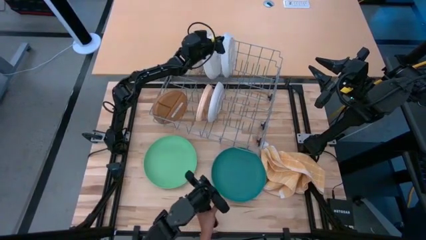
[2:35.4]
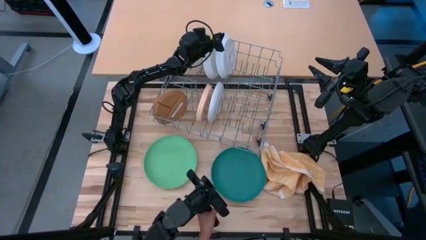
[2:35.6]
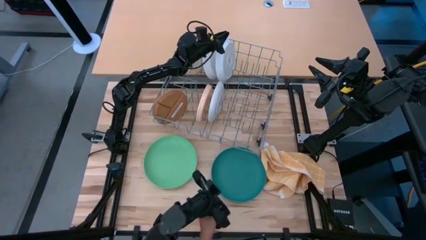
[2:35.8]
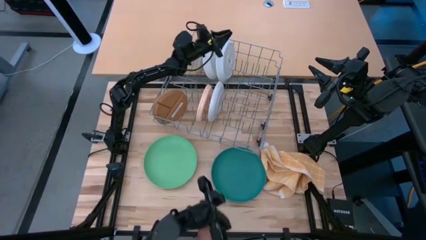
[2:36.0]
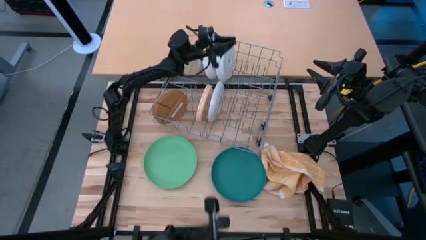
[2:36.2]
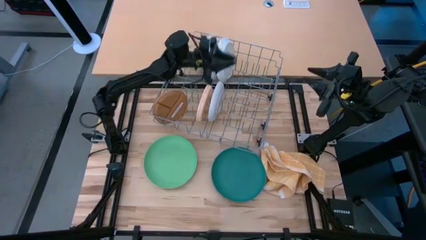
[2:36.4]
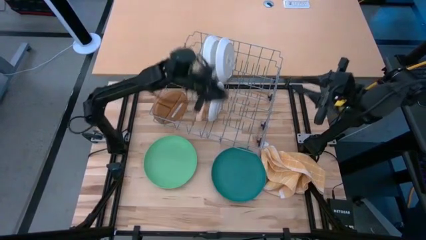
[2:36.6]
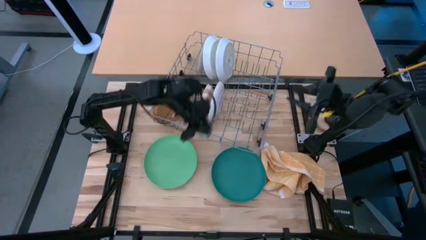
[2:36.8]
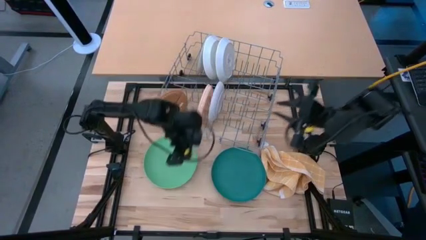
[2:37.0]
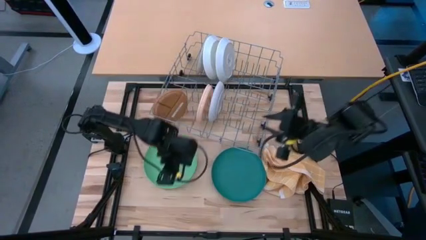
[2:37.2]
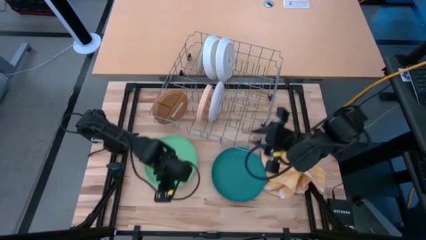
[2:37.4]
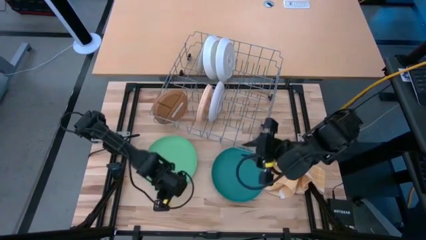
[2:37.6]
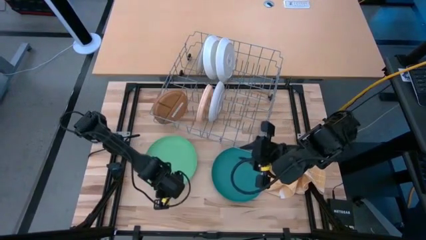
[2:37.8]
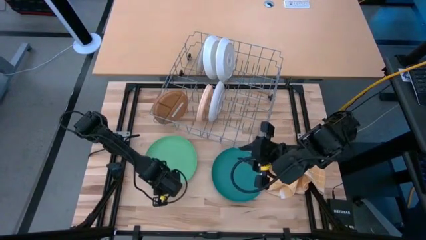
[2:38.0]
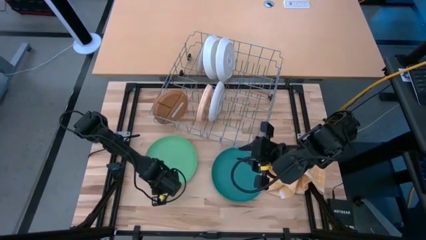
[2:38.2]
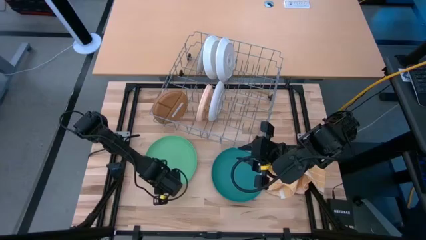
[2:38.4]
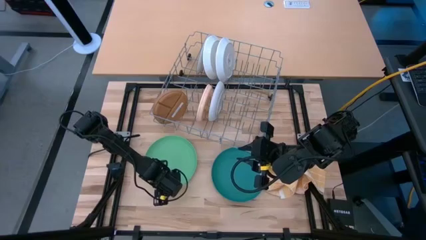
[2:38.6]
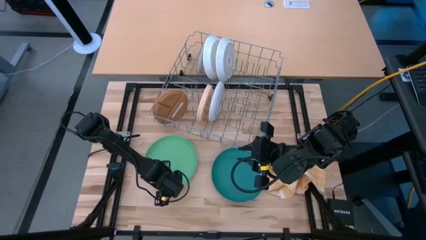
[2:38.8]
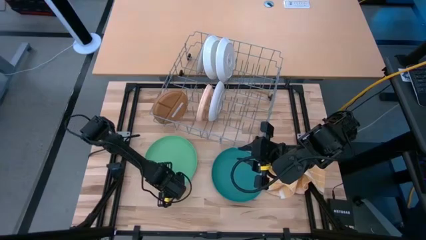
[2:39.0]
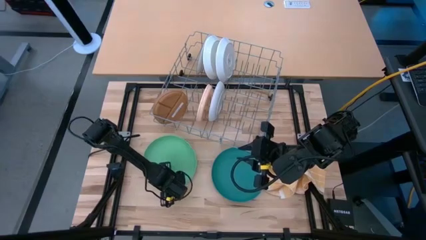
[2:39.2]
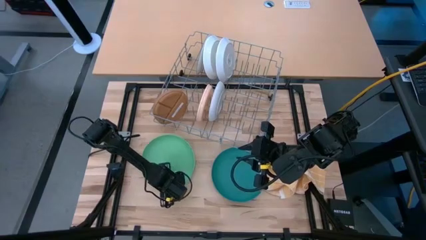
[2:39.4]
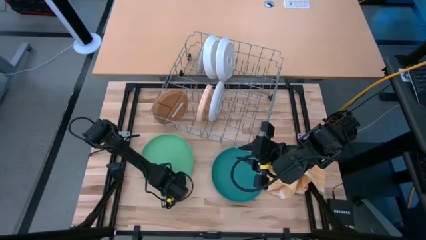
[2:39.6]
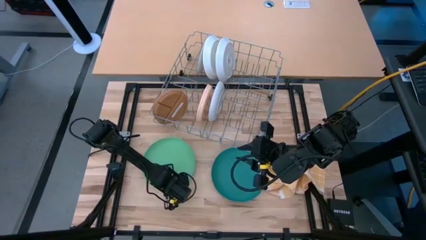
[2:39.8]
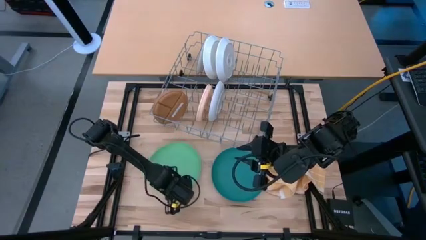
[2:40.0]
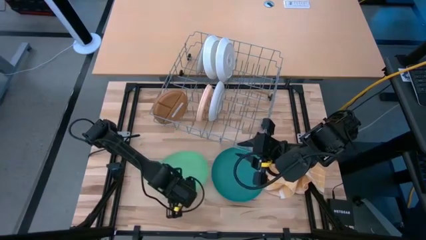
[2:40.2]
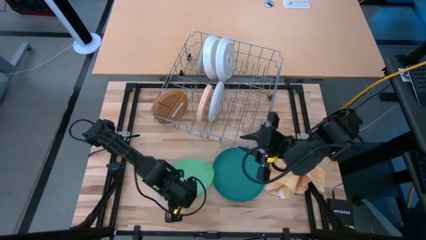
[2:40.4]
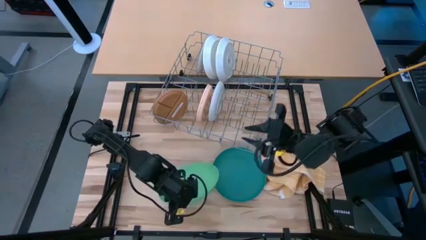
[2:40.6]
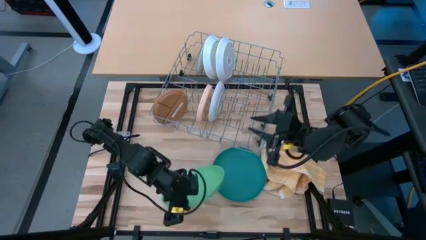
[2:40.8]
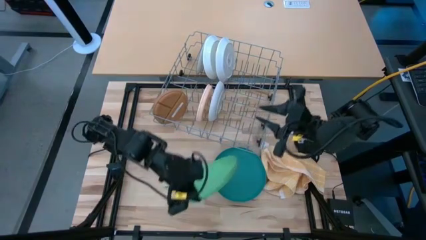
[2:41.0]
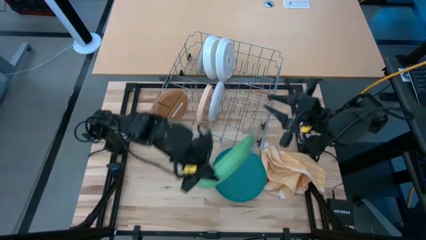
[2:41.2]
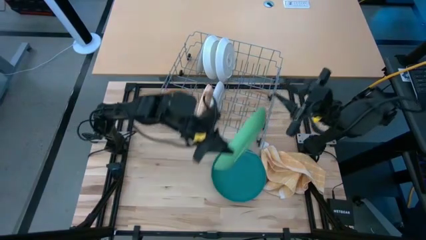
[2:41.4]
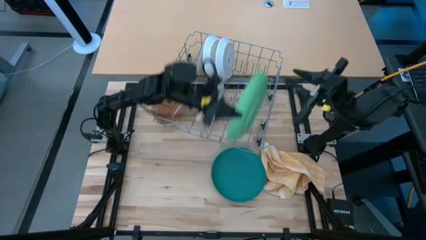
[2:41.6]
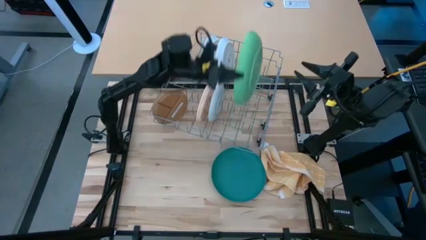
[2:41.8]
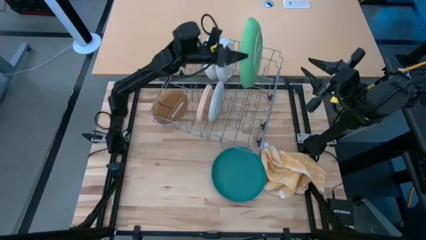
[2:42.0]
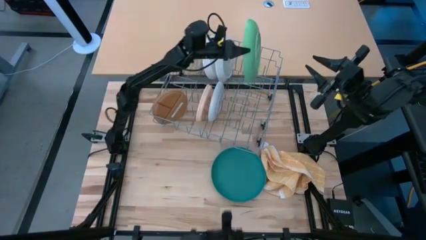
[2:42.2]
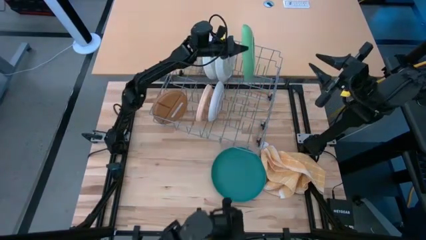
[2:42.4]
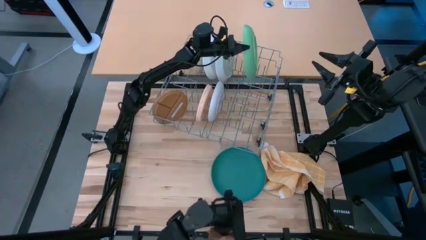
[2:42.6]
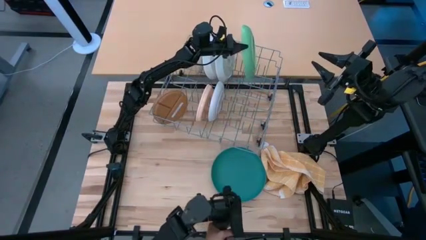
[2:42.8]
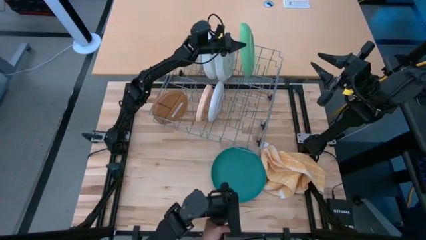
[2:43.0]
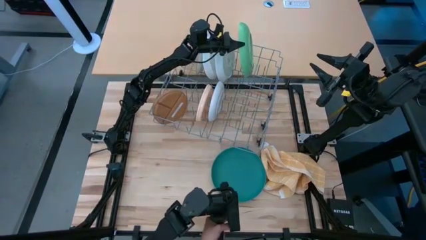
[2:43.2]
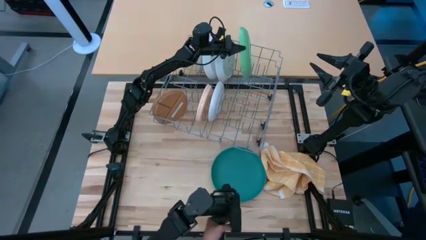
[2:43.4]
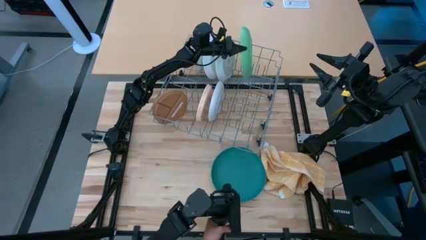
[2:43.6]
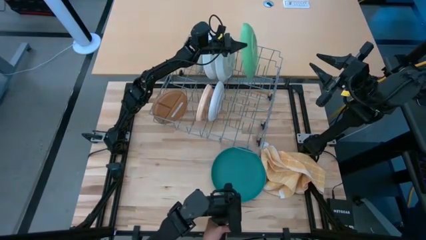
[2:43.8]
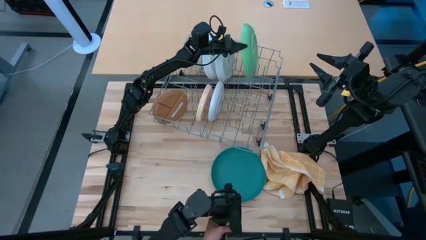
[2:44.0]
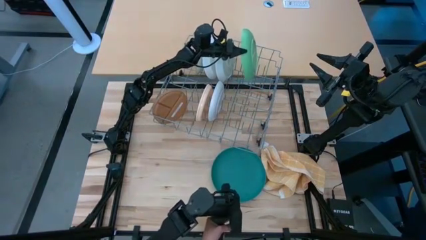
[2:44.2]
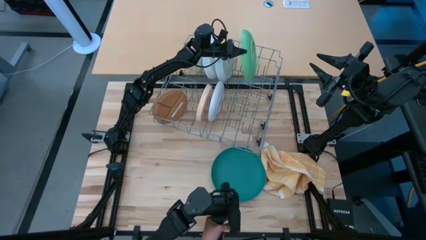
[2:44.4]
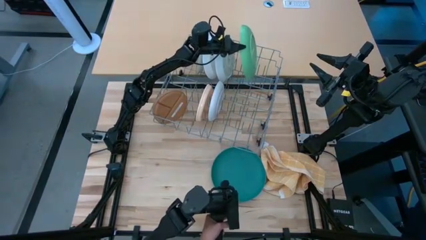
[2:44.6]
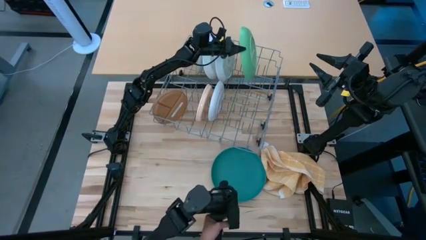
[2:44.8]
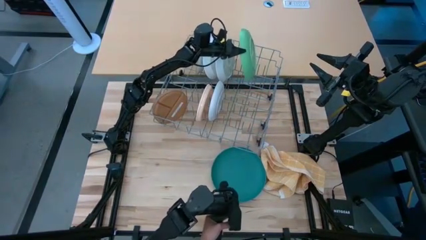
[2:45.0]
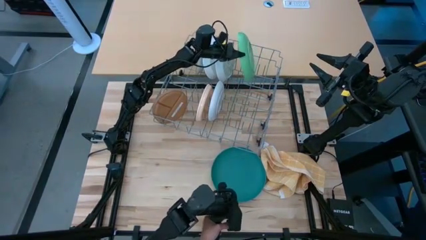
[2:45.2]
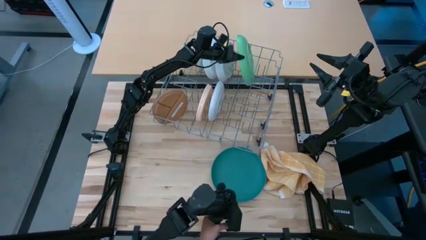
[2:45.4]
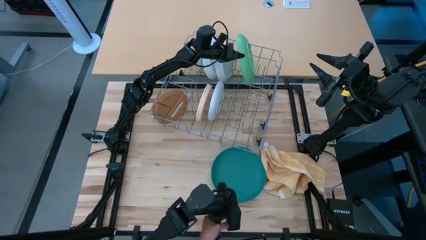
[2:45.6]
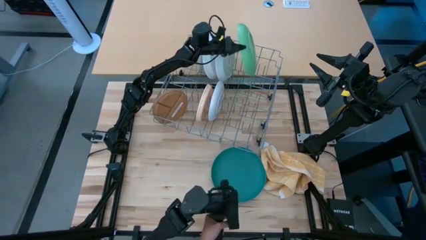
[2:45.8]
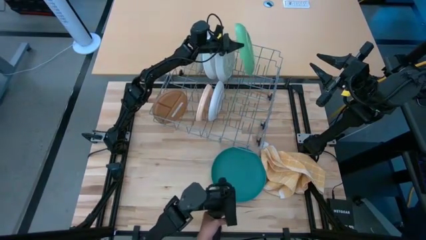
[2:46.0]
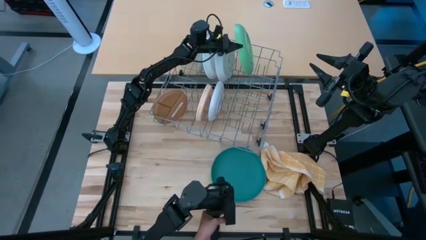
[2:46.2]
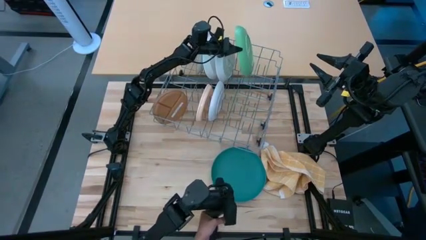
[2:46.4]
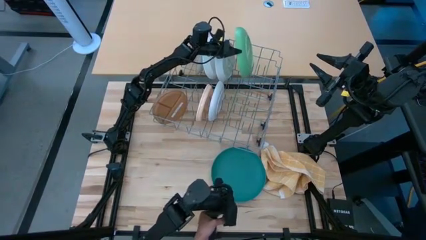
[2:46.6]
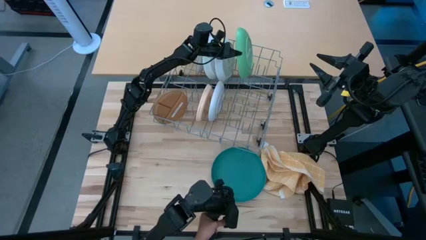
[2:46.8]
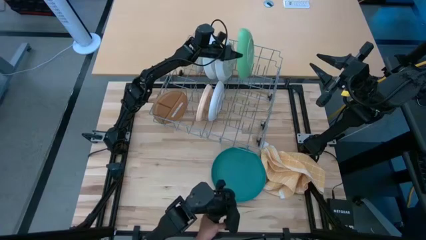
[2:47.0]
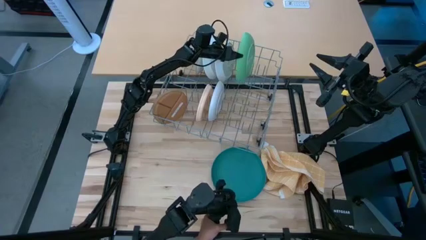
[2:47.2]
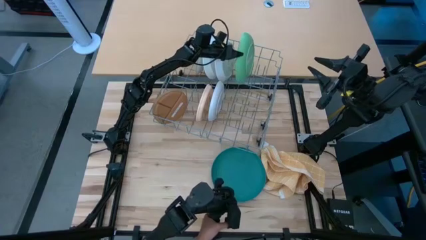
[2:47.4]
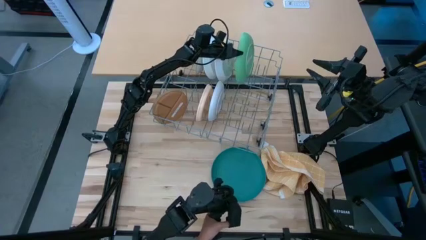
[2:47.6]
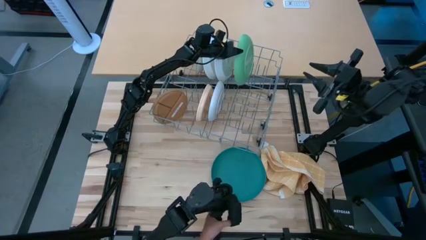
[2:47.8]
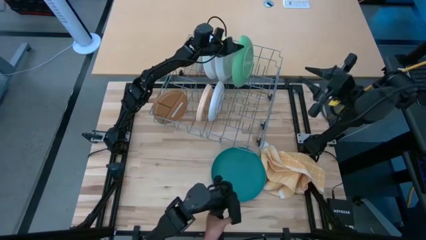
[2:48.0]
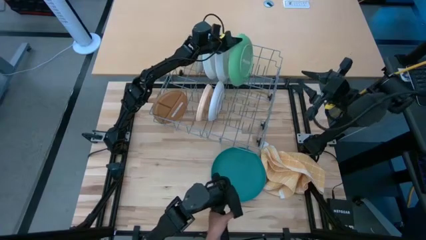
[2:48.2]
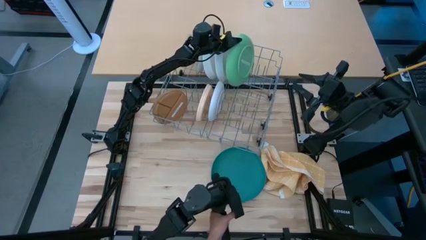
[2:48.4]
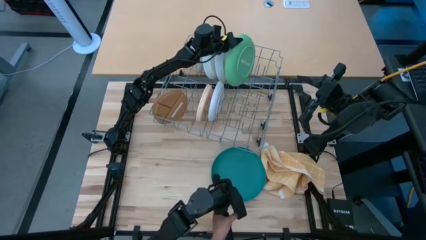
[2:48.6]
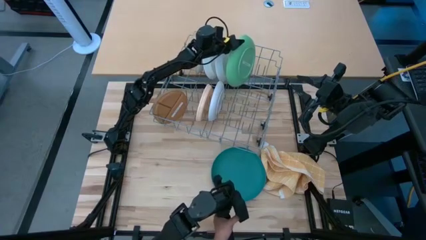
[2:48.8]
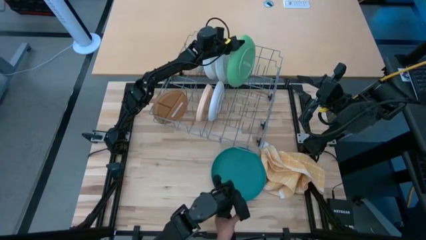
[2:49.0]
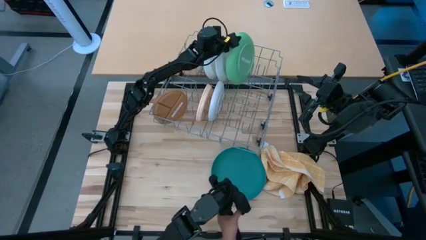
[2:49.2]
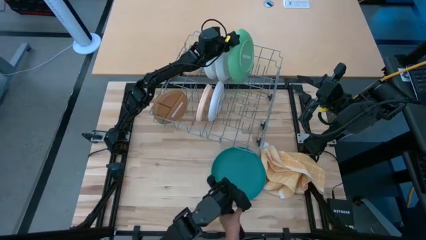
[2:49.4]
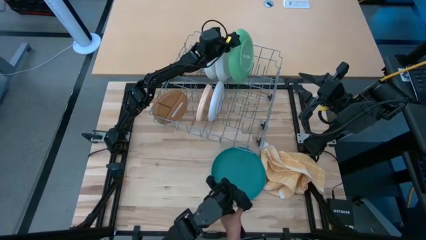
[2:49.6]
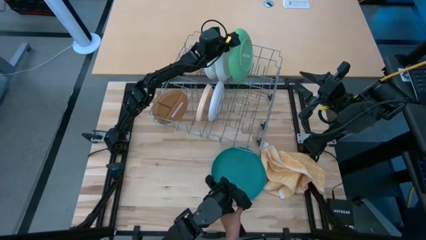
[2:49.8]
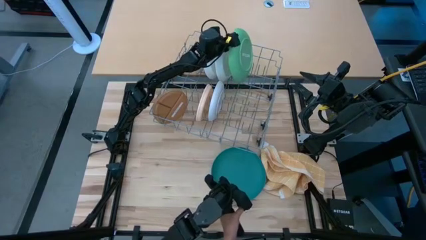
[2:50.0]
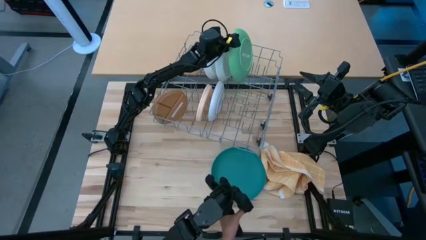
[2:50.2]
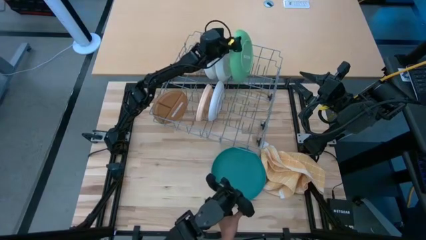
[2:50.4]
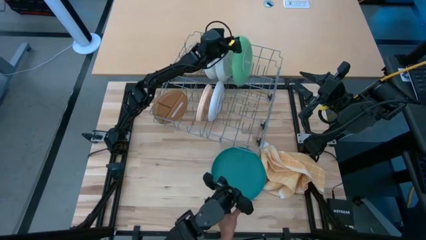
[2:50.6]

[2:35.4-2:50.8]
Task: Sort dishes
Put the light green plate in the dish rack
